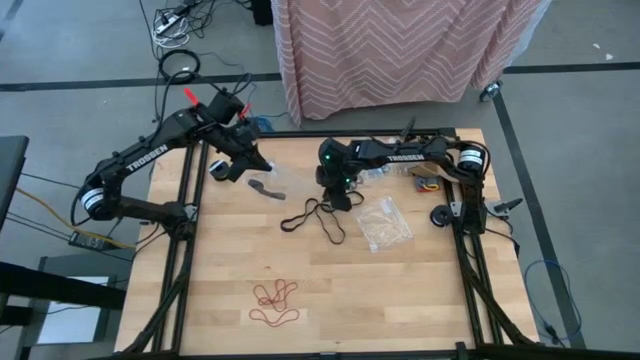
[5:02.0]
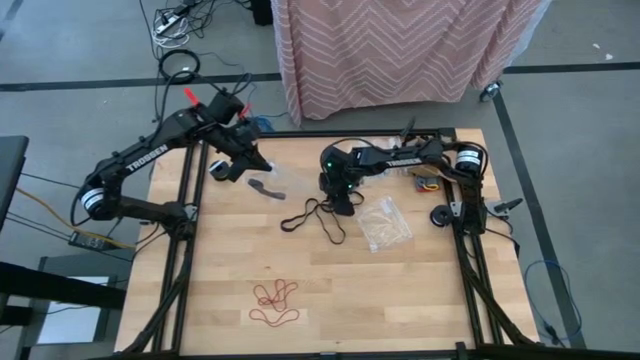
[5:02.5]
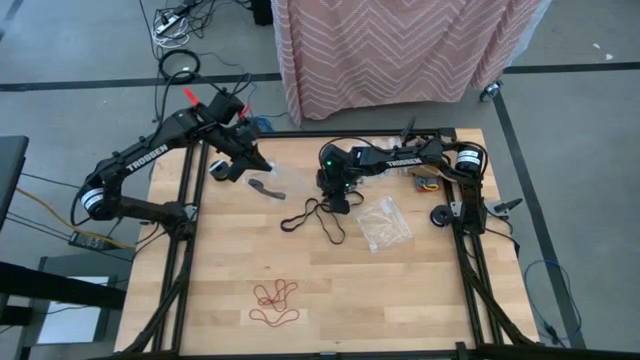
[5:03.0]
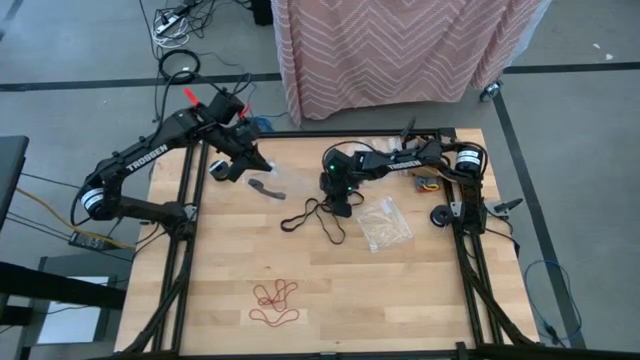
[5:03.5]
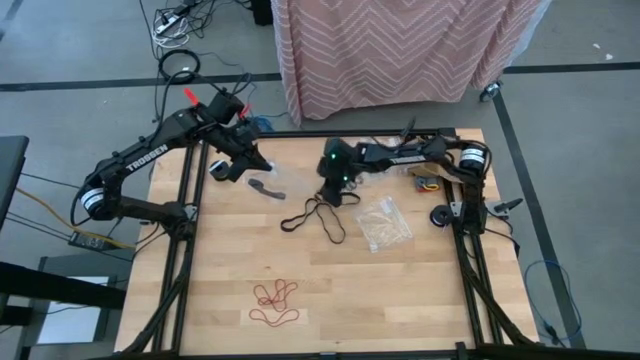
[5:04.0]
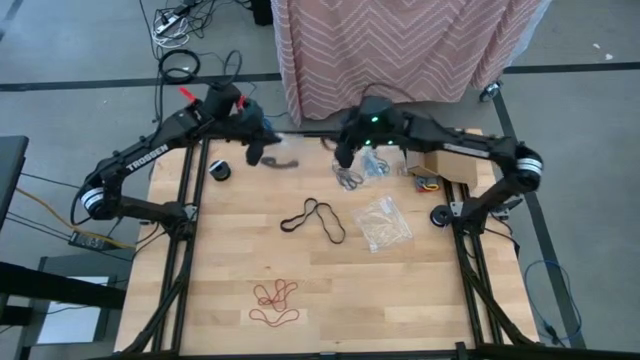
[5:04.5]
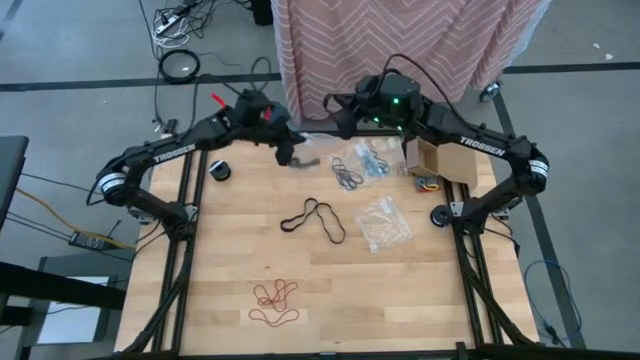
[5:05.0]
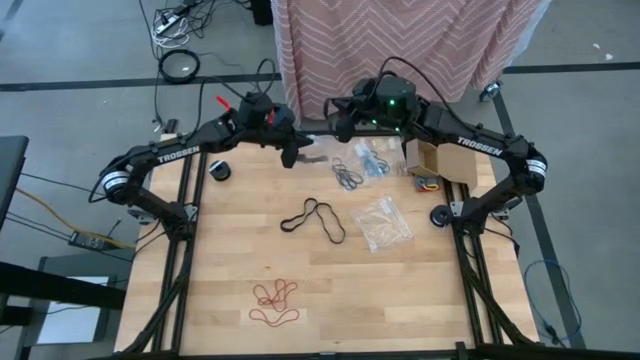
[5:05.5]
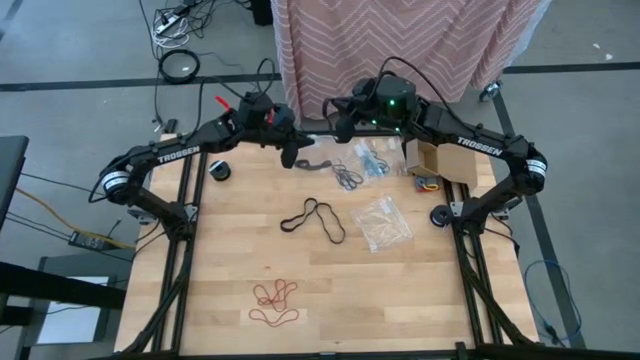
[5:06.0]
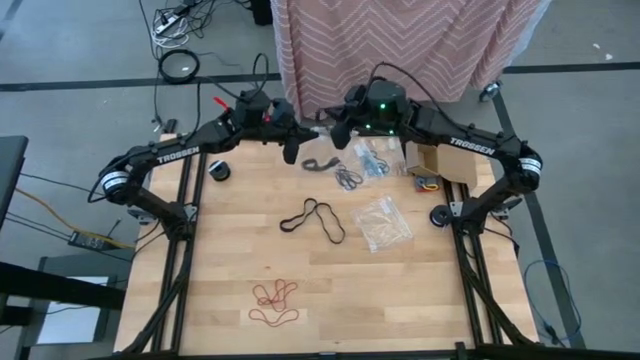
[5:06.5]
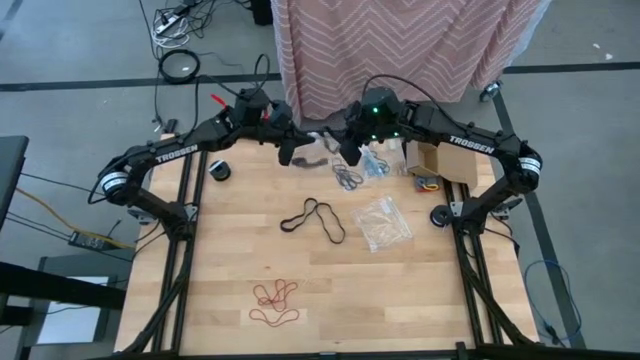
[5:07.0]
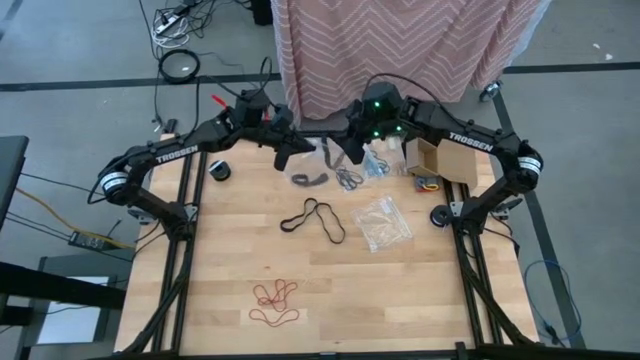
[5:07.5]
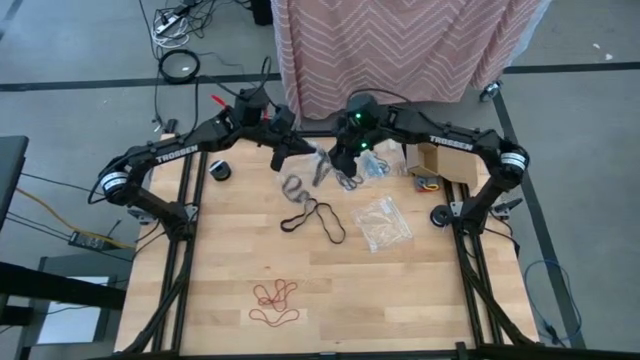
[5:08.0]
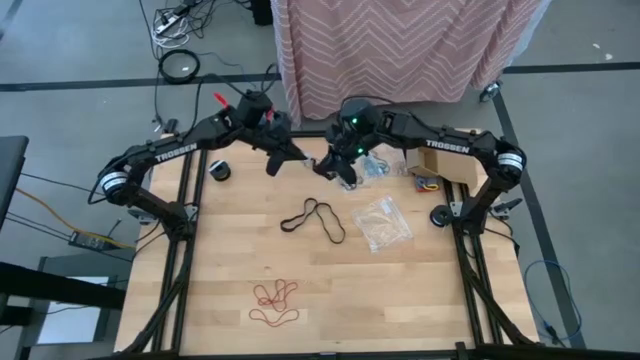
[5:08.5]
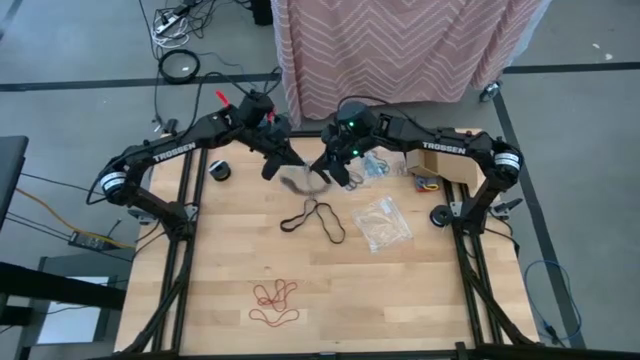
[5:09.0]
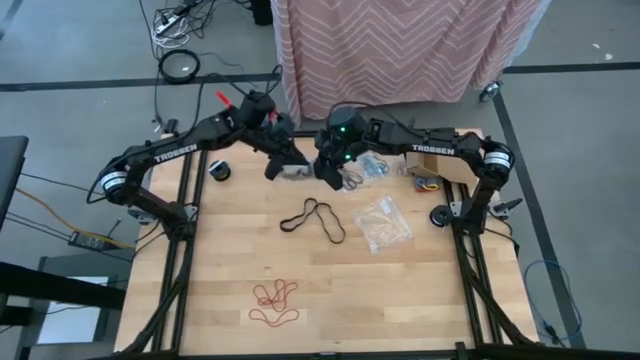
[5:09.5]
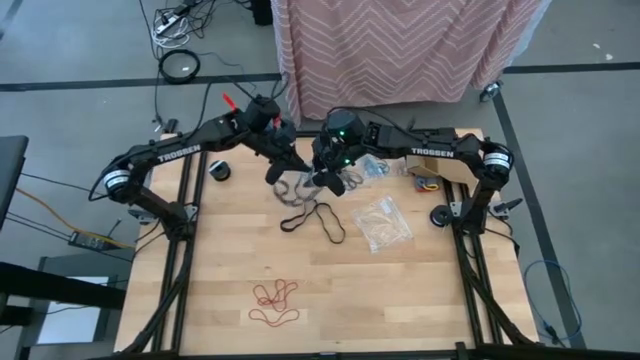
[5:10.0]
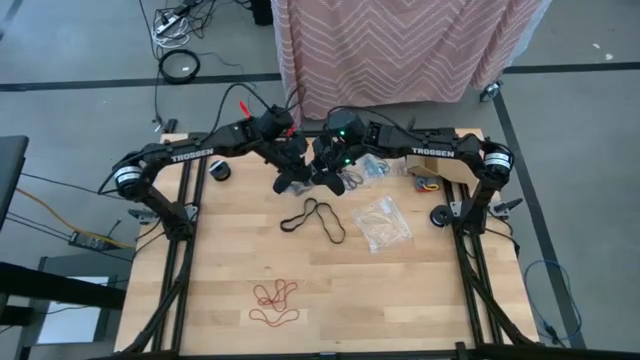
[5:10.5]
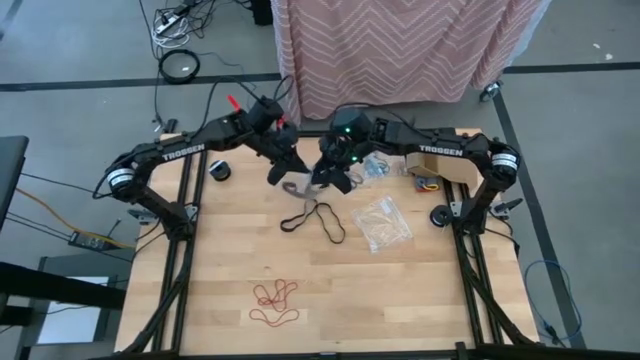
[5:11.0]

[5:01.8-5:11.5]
Task: Sort rubber bands
Put the black rubber band into the left transparent zip bag

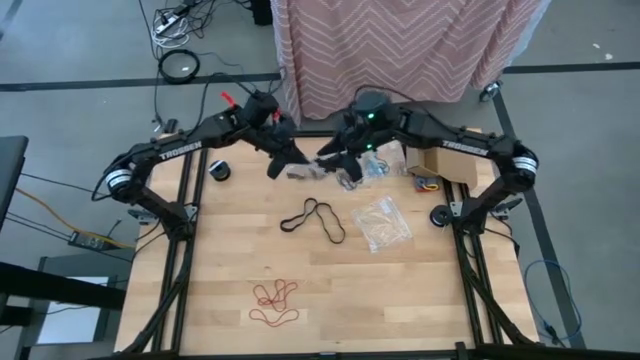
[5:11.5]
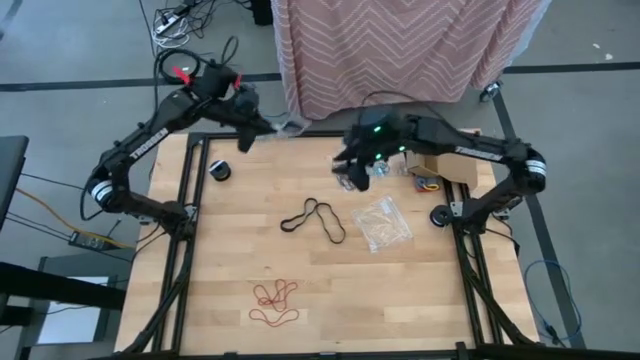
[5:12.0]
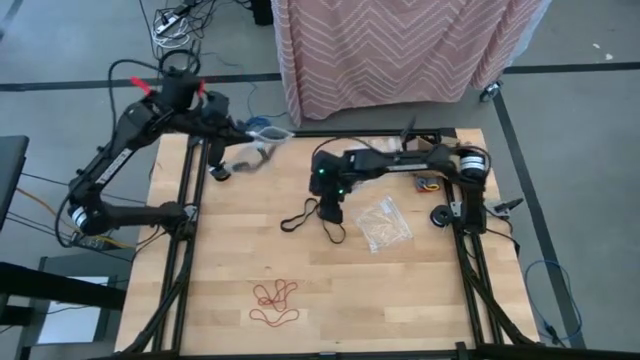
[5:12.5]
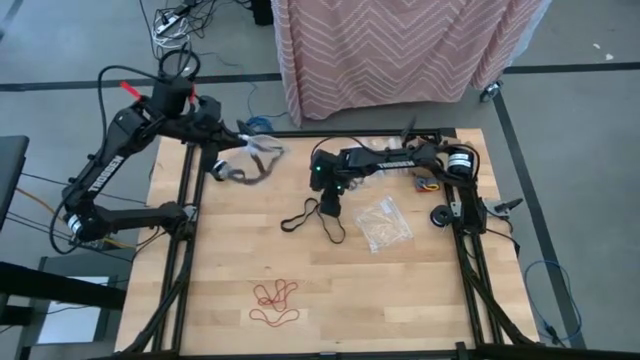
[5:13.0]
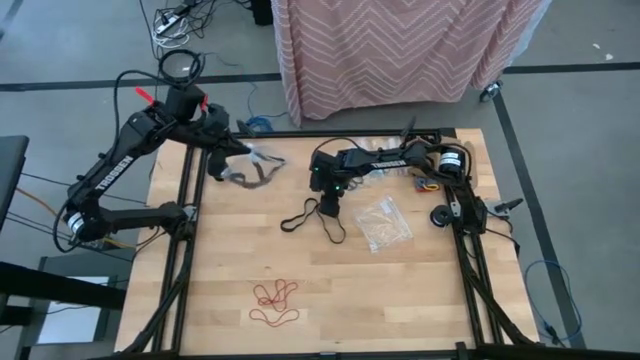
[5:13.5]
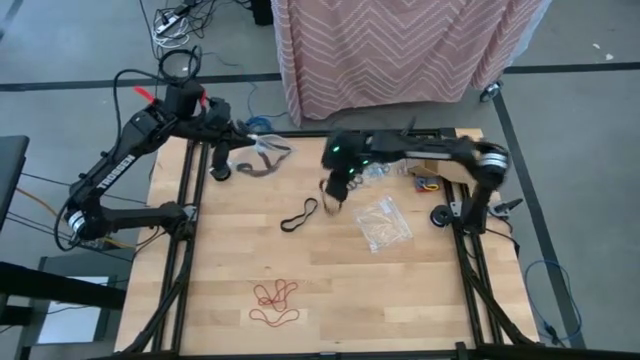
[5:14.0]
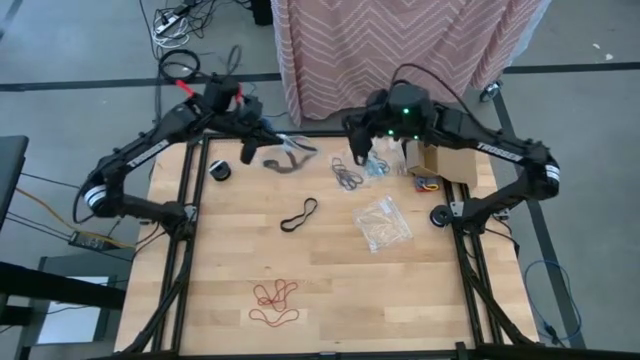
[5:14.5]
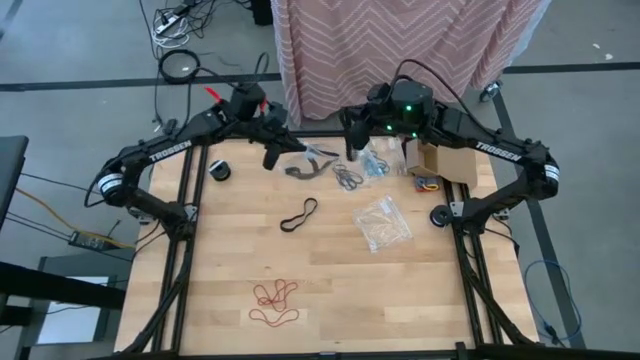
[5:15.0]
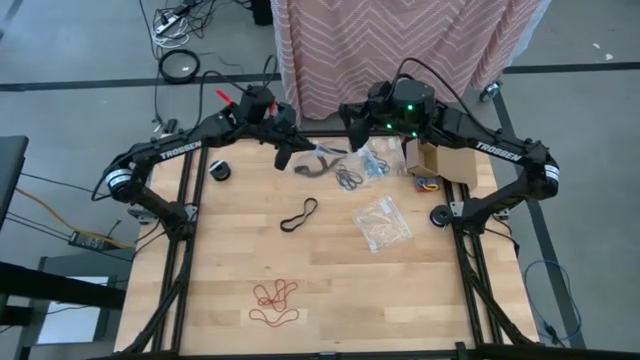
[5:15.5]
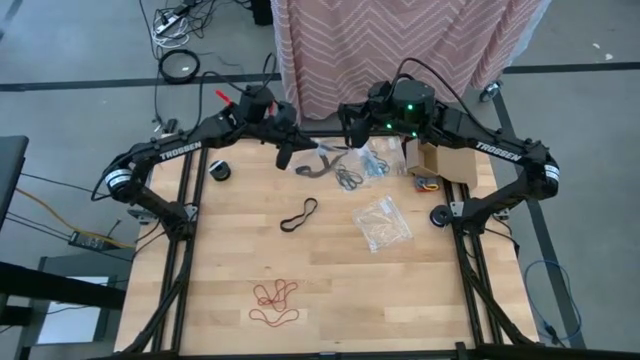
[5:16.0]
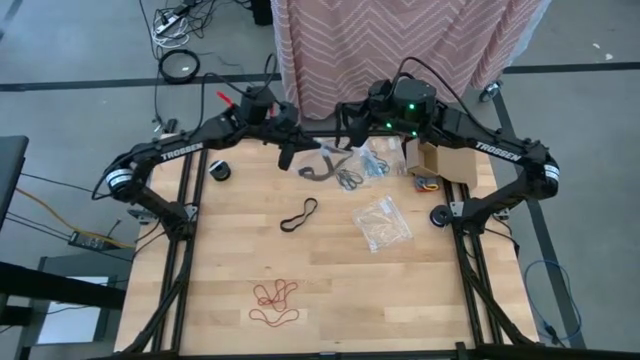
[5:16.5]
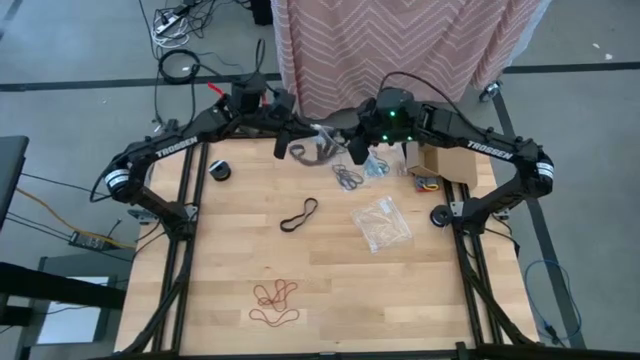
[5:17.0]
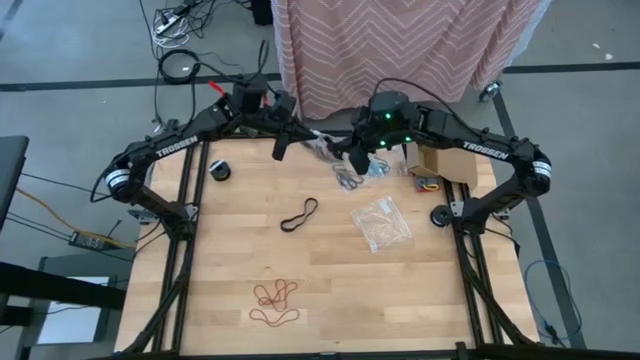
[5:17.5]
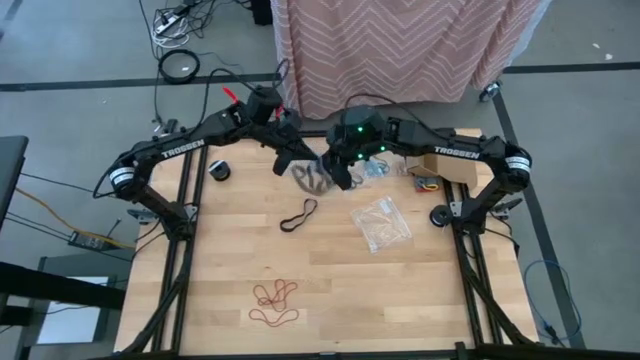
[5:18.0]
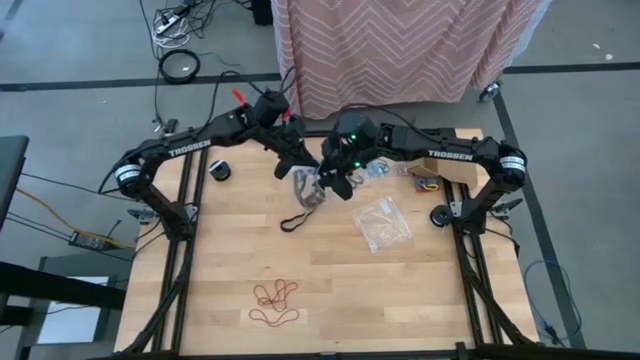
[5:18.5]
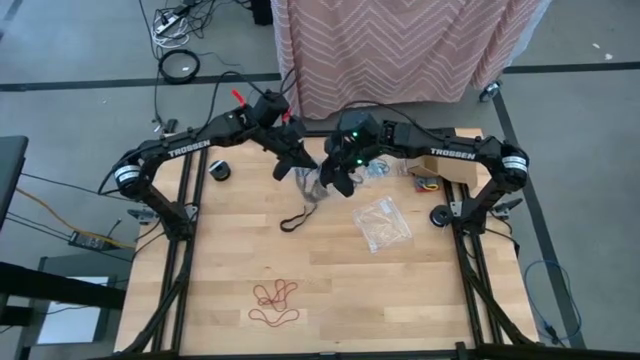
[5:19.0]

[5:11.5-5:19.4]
Put the black rubber band into the left transparent zip bag

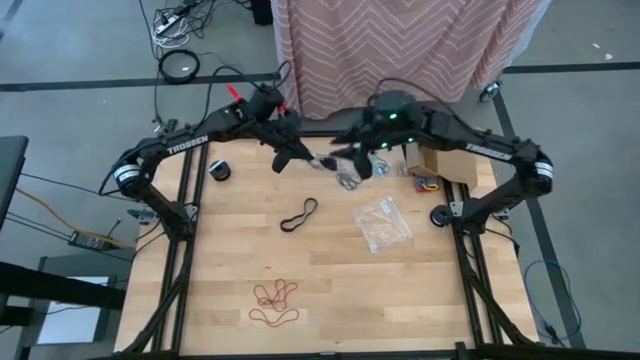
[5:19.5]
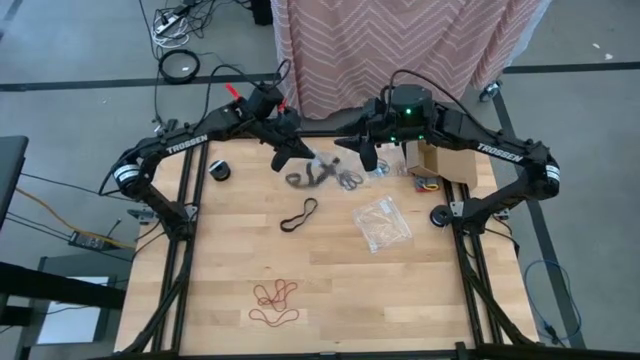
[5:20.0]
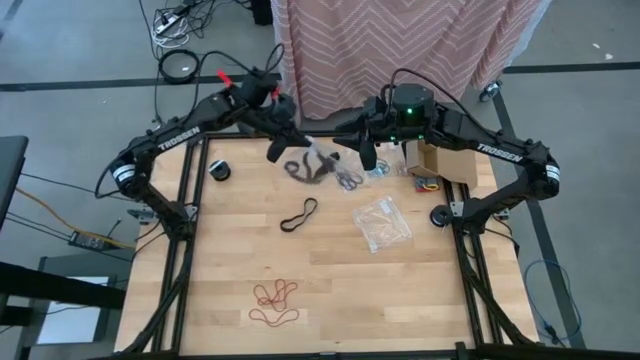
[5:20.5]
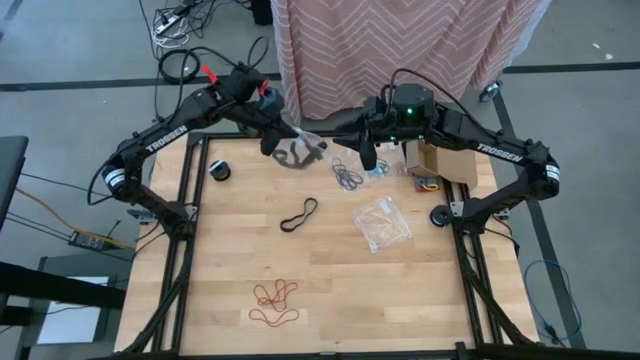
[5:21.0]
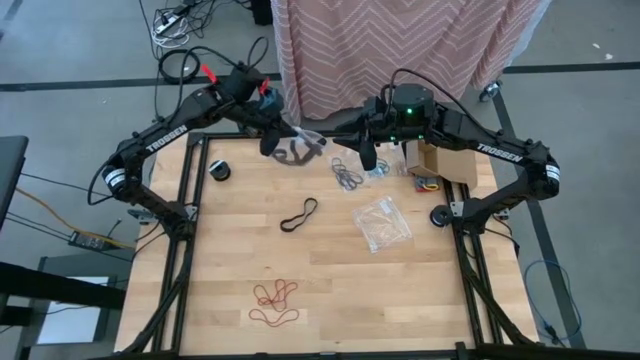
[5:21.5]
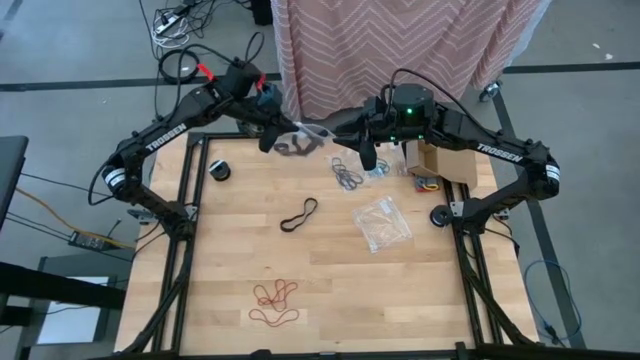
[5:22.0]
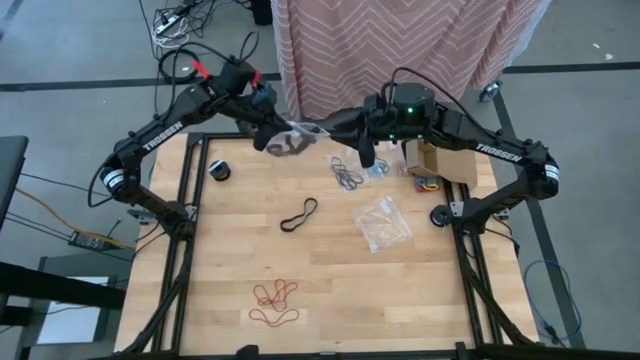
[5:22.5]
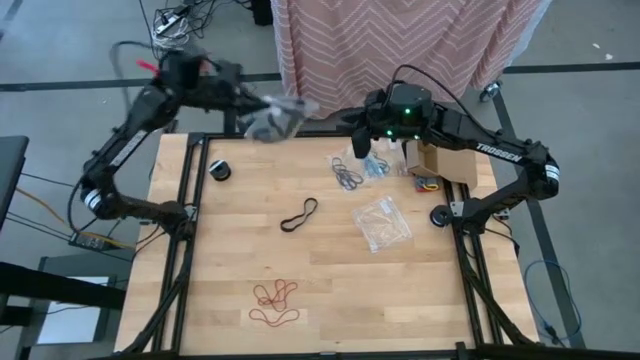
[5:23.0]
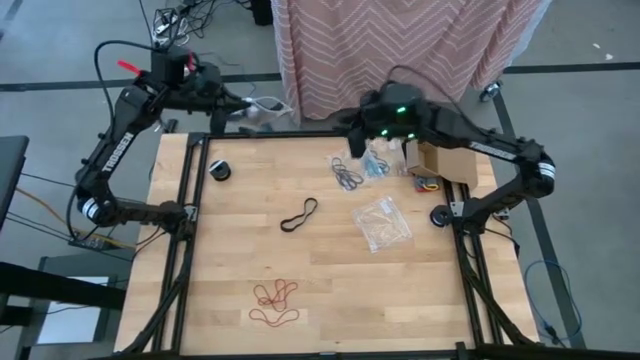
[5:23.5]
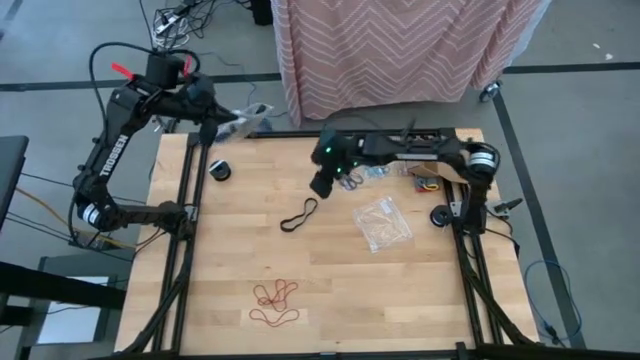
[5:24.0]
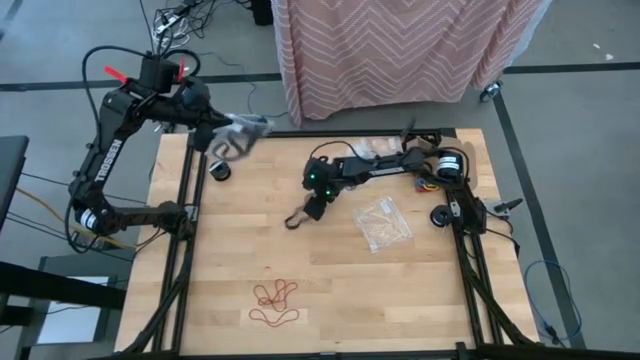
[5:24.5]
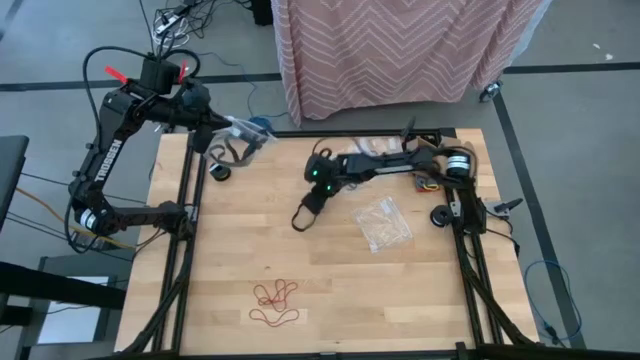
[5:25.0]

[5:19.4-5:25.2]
Put the black rubber band into the left transparent zip bag
